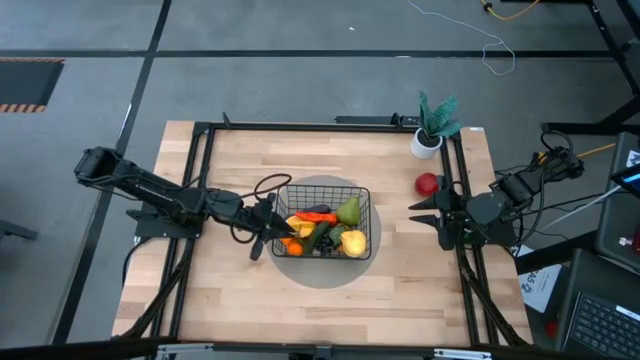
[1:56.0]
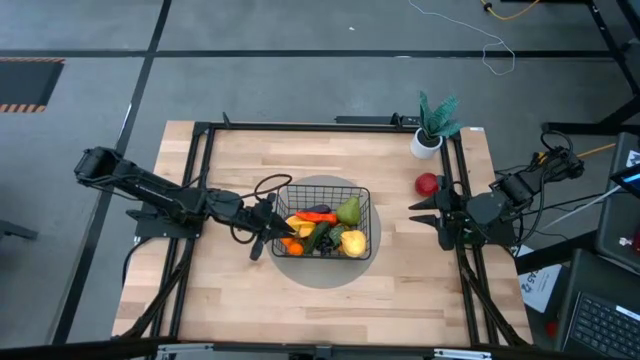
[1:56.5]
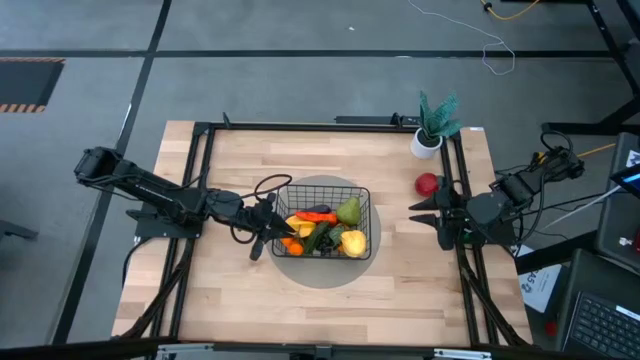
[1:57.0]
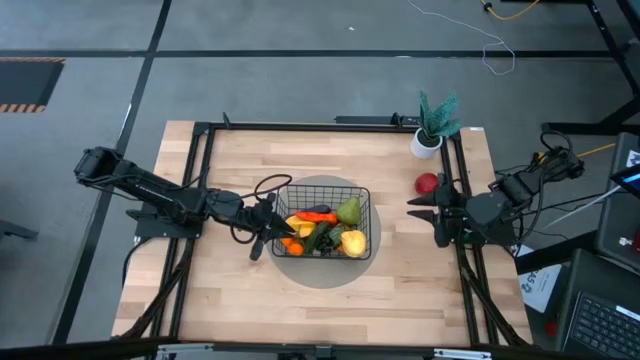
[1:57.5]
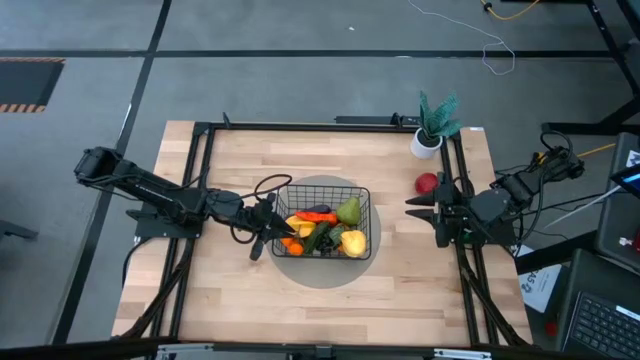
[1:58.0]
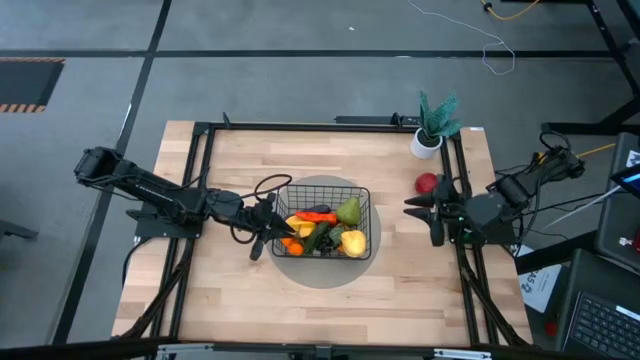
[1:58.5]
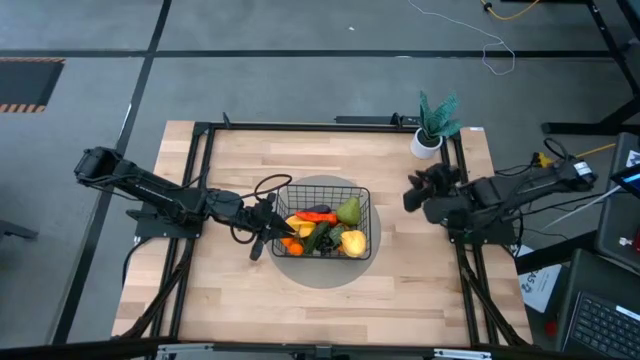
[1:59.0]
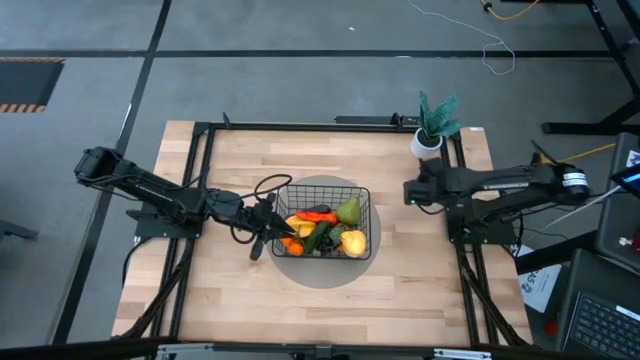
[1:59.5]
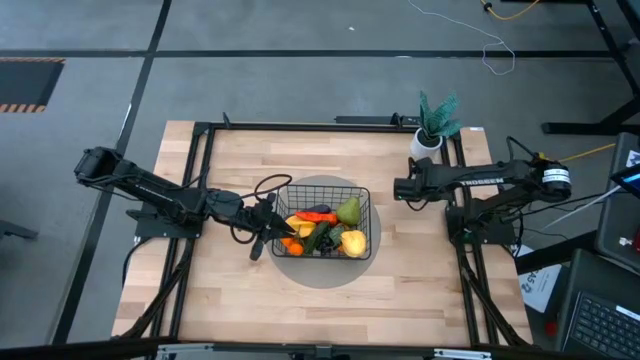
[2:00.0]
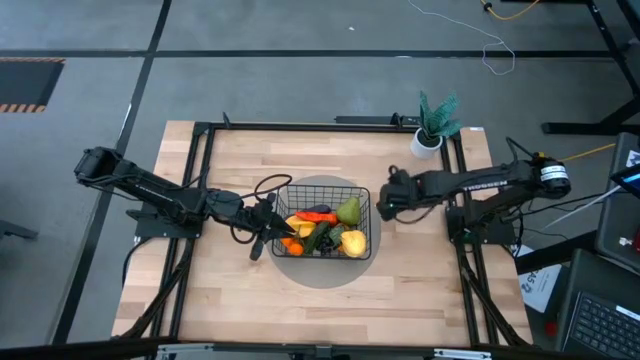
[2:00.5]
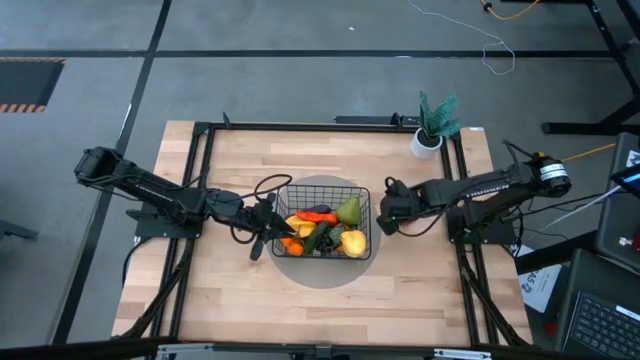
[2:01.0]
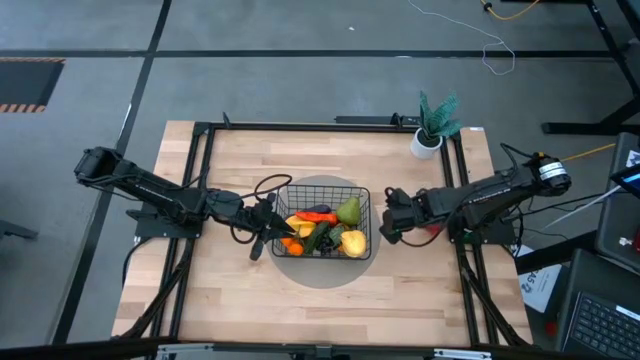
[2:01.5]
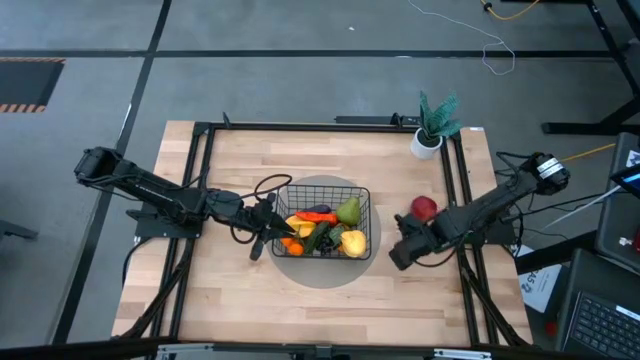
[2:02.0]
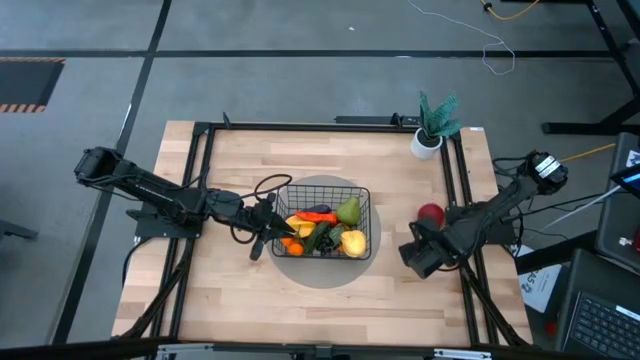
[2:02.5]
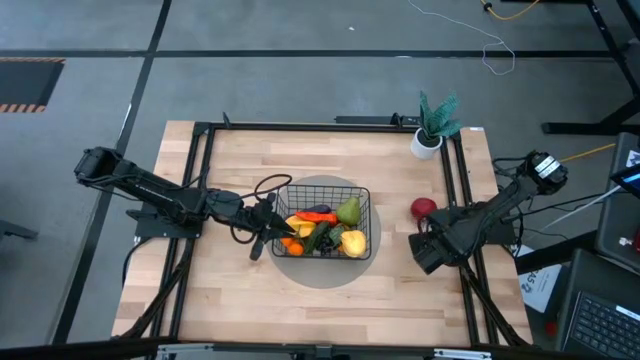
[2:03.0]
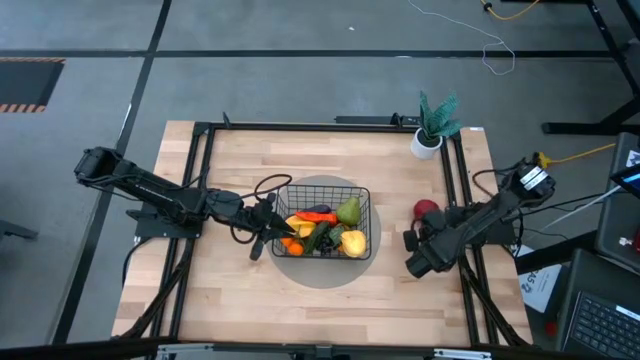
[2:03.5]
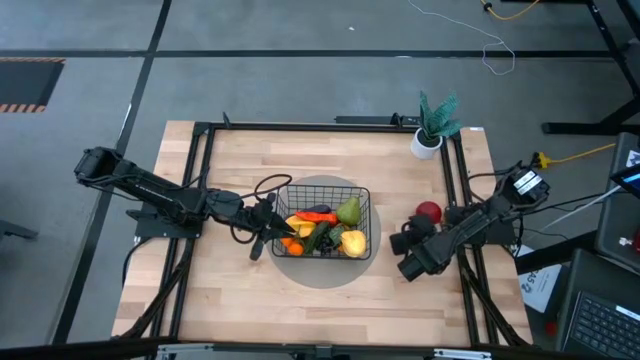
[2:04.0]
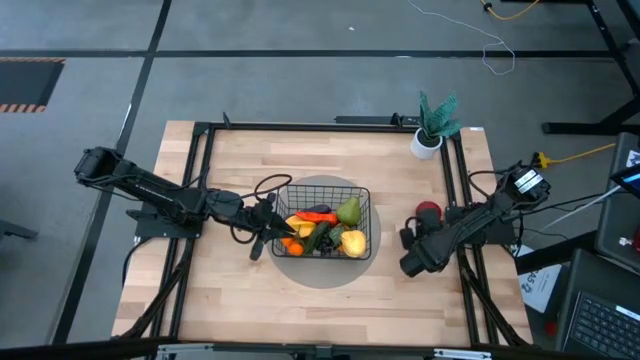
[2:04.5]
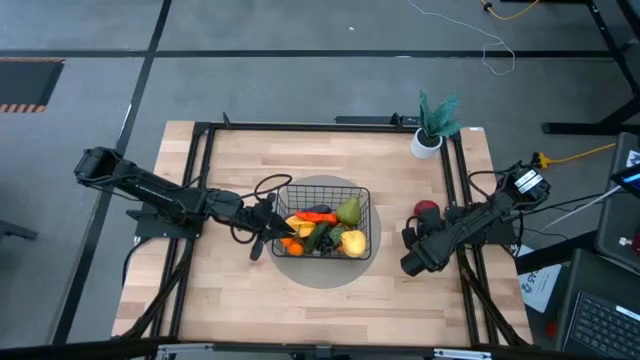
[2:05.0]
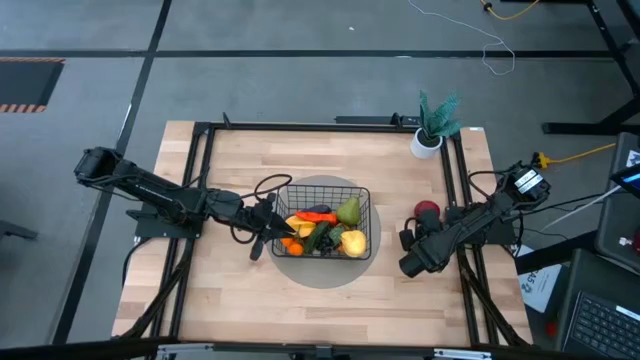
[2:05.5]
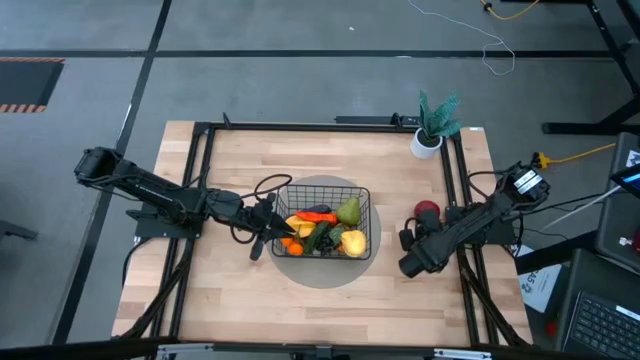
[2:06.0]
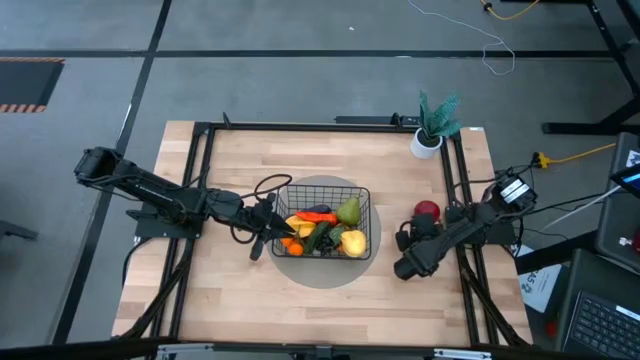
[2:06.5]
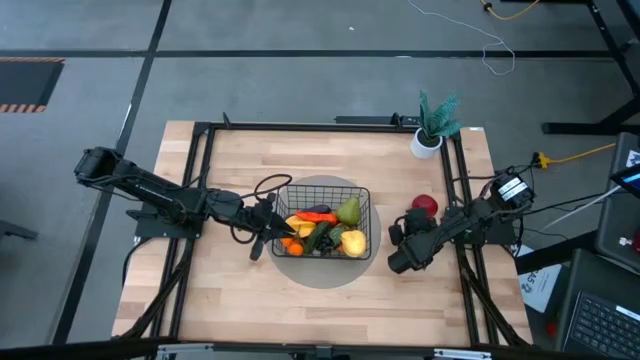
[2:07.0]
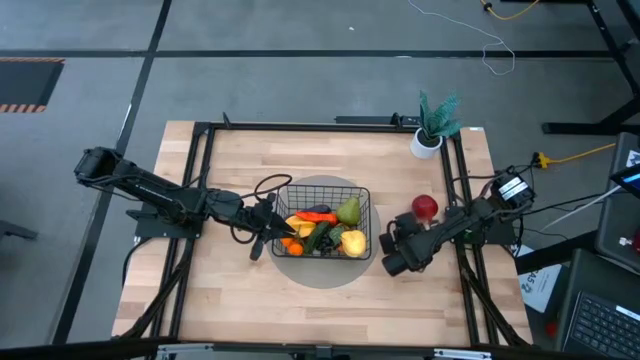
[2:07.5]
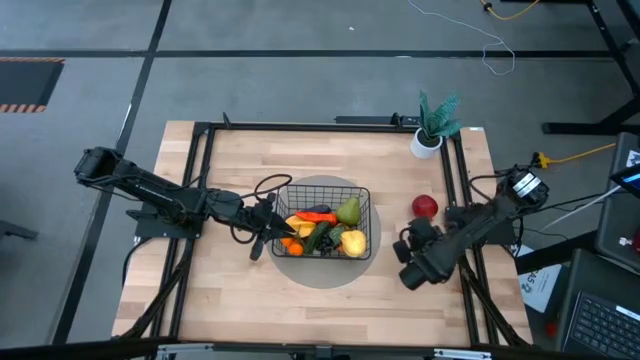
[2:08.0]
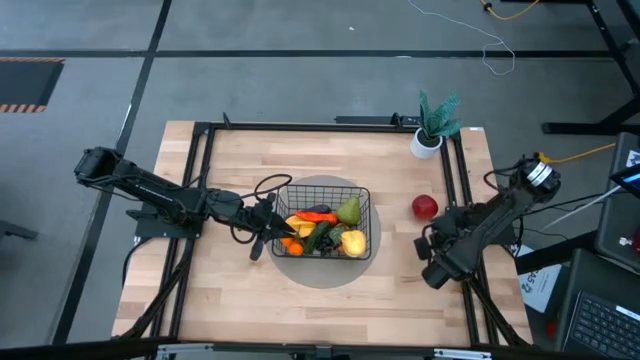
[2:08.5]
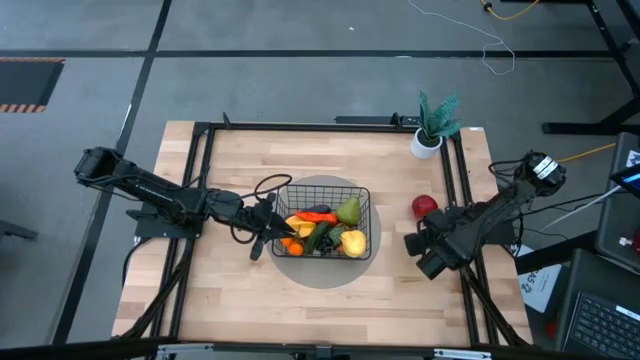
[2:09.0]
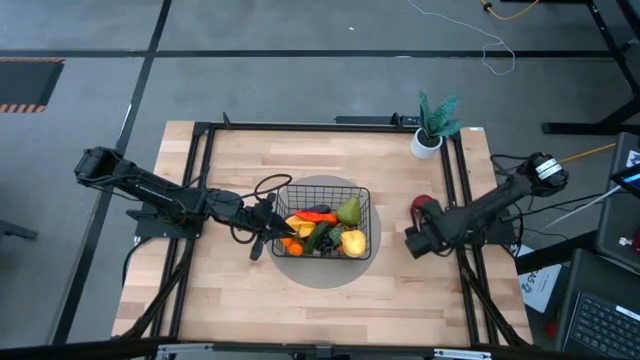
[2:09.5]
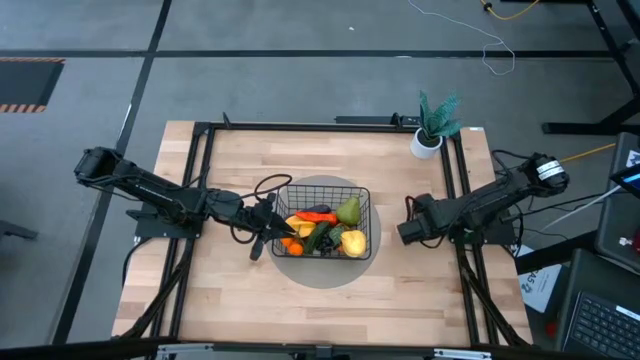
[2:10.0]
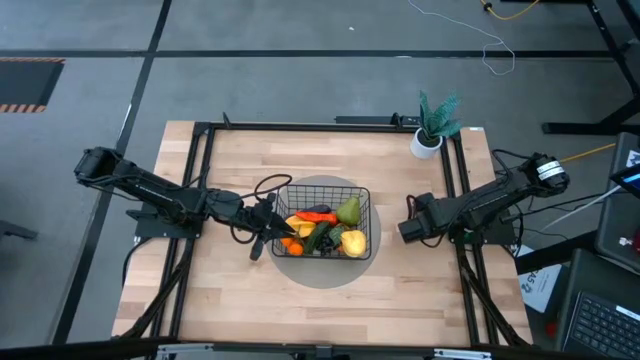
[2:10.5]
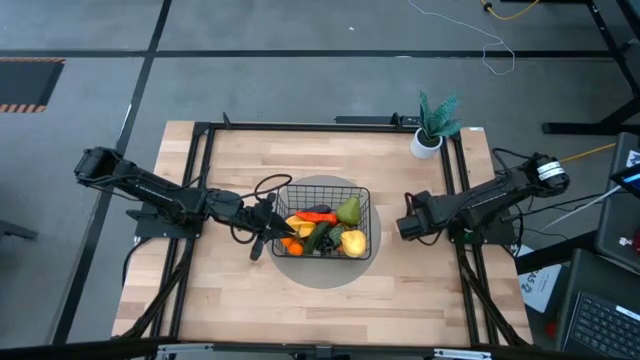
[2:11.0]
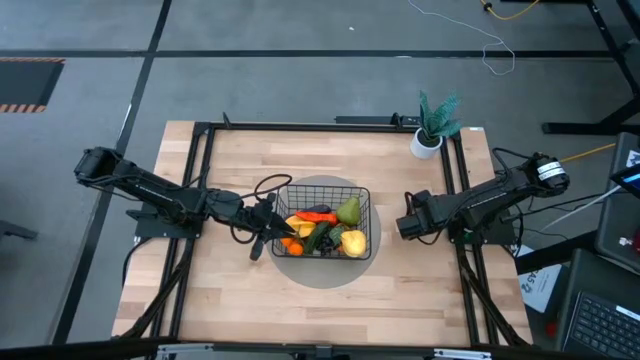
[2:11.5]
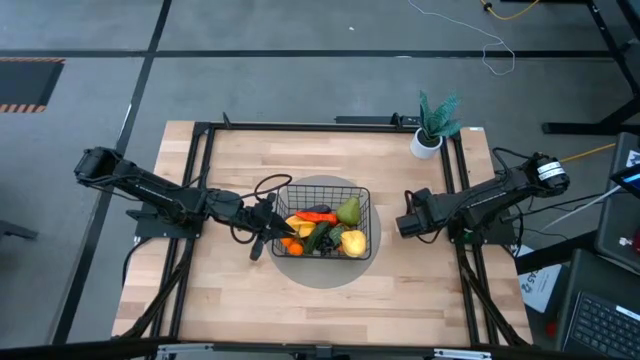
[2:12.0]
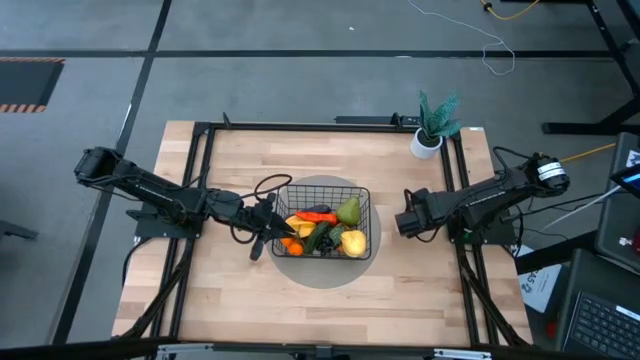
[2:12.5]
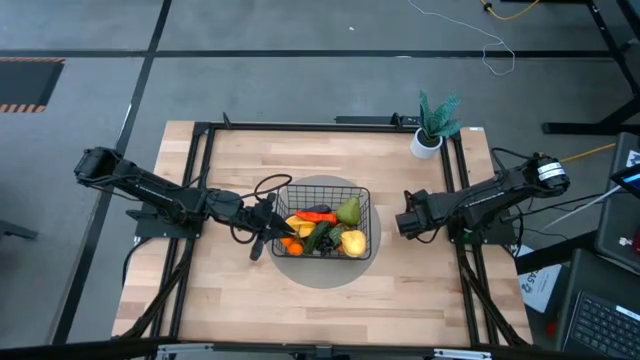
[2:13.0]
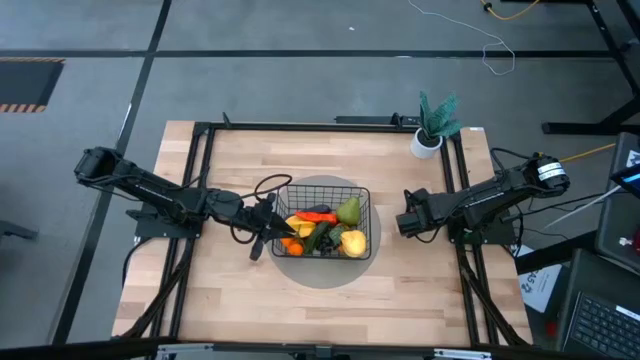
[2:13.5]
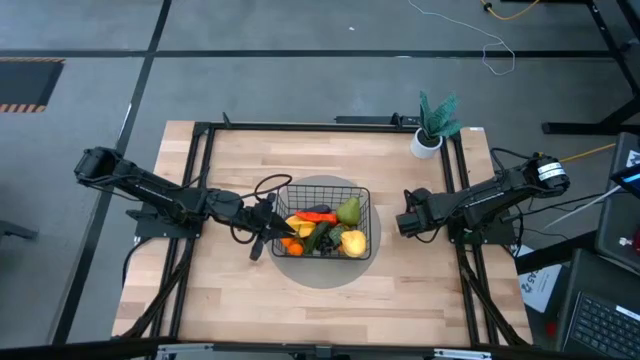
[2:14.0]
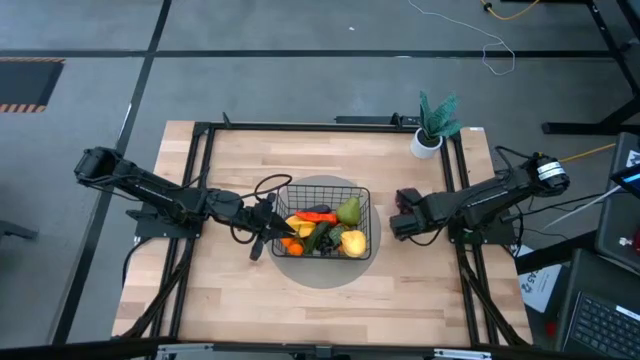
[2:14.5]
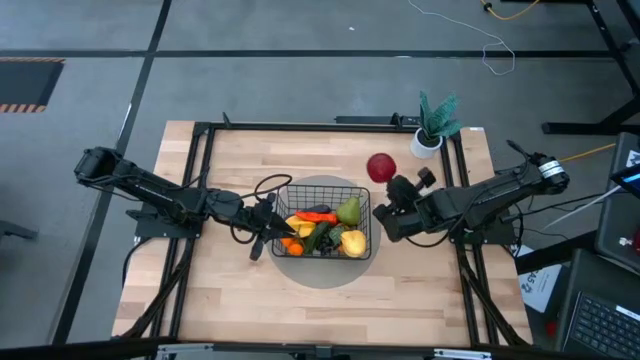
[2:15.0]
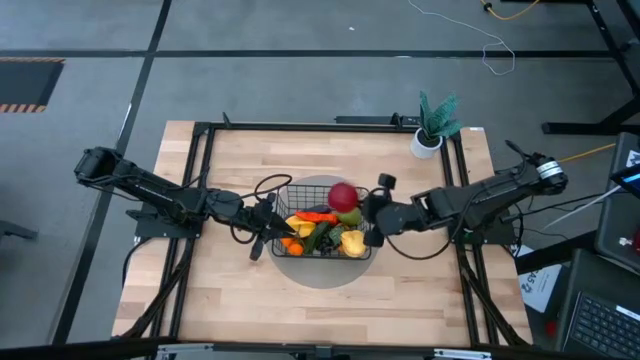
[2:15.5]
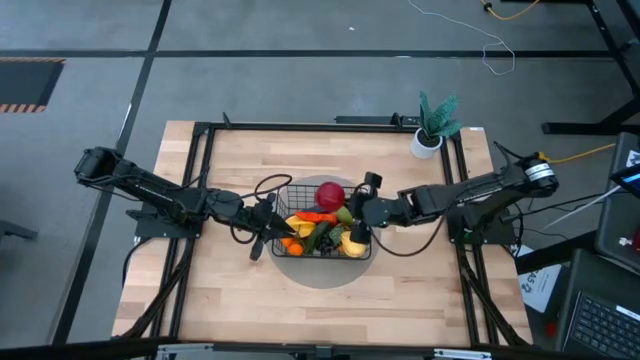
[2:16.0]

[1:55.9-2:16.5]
Task: Build produce basket
Put the pomegranate into the black wire basket

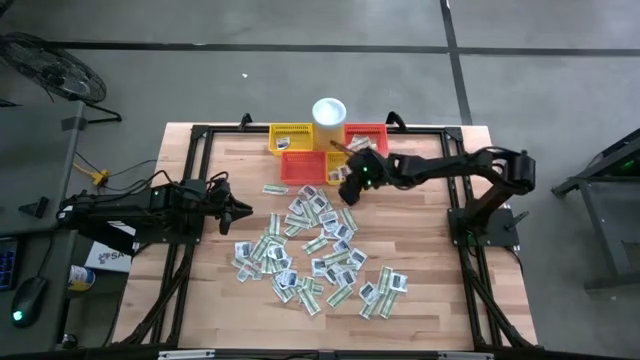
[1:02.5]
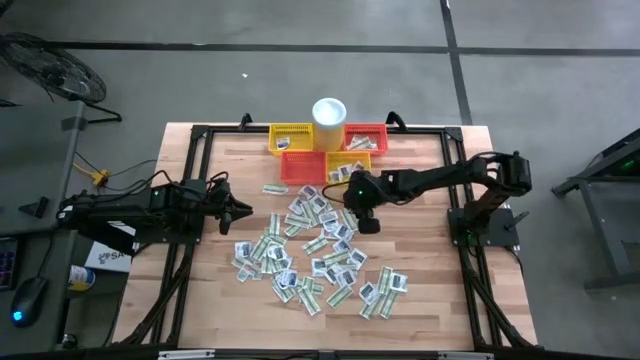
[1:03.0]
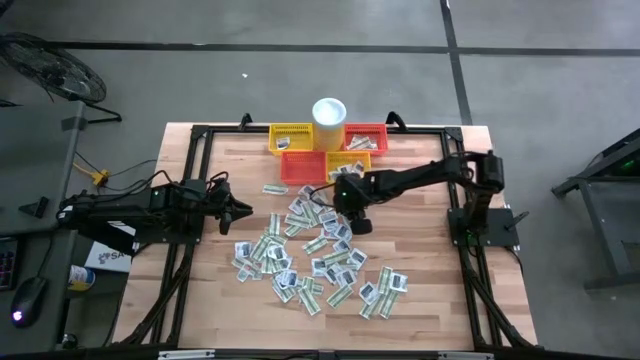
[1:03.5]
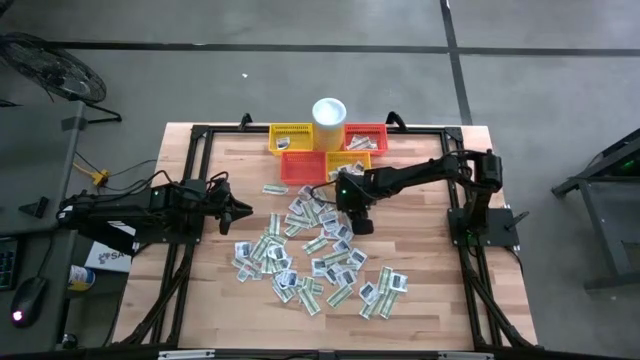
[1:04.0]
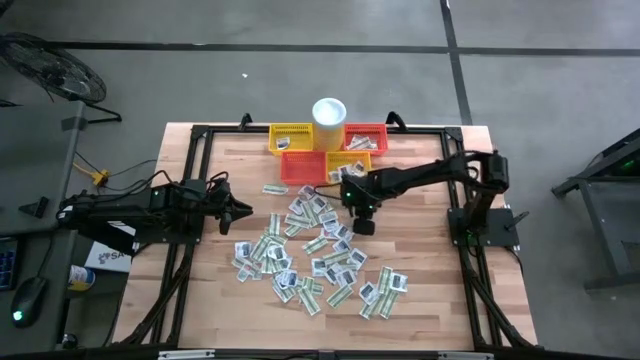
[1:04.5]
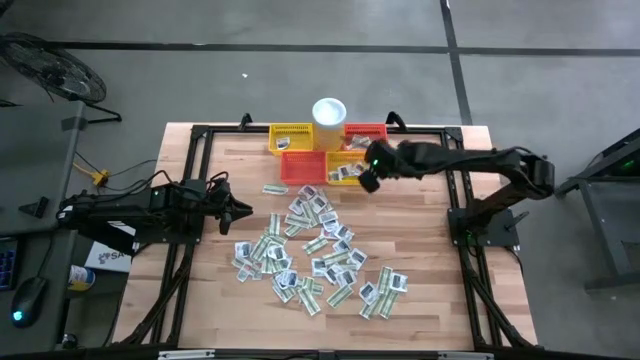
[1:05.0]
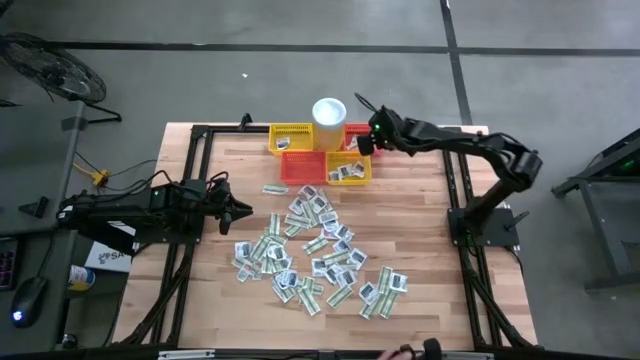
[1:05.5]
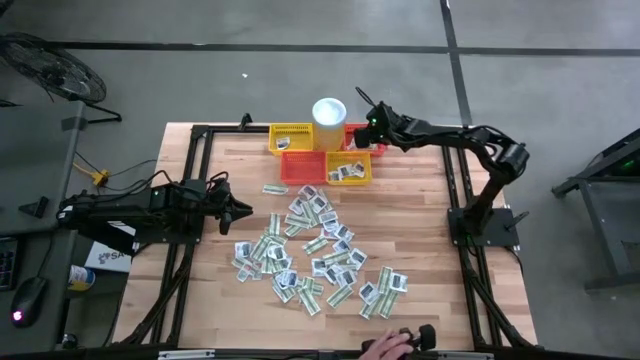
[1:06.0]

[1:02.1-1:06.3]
Task: Pick & Place First Aid Supplies
Put the green bandage pack into the top orange basket
